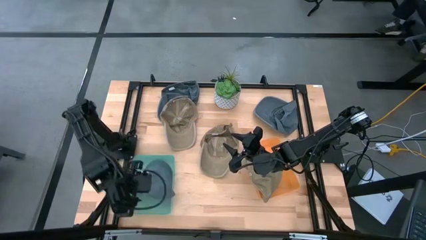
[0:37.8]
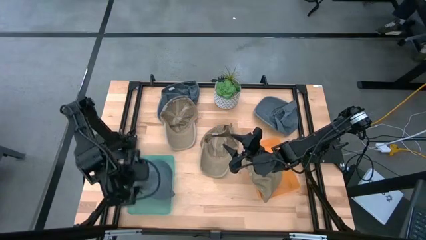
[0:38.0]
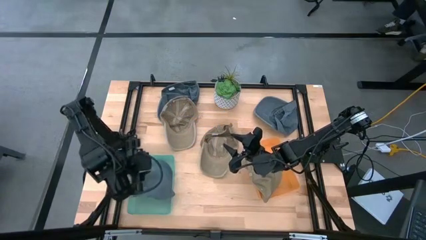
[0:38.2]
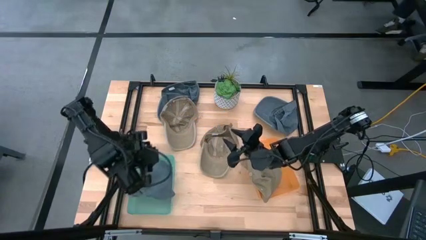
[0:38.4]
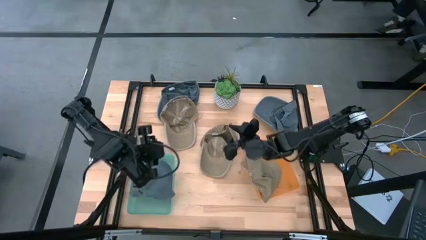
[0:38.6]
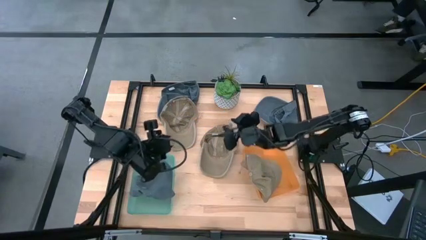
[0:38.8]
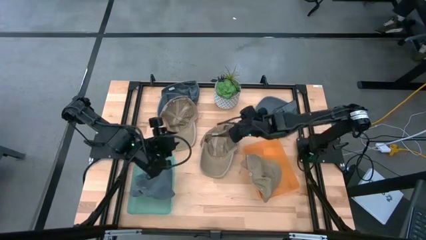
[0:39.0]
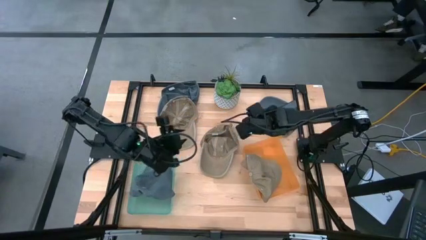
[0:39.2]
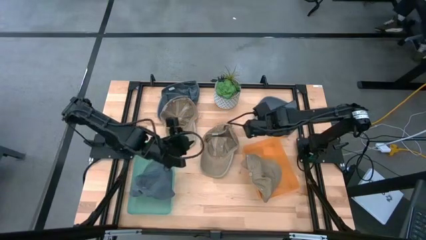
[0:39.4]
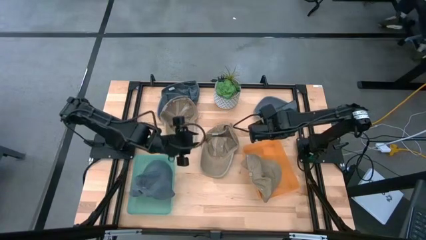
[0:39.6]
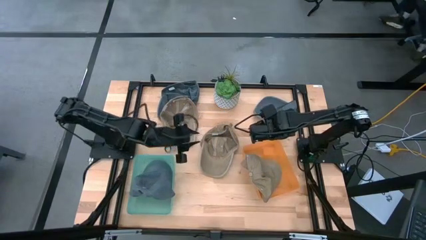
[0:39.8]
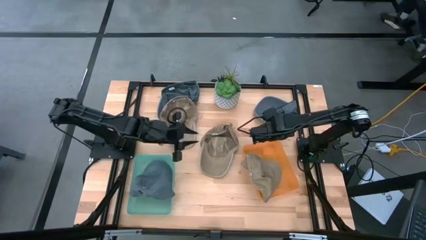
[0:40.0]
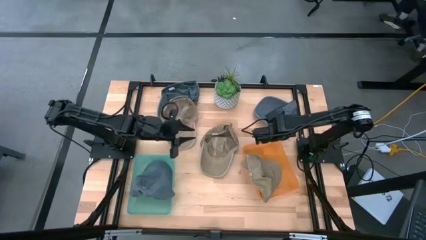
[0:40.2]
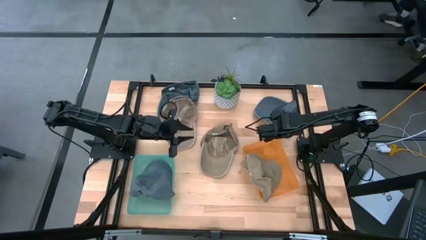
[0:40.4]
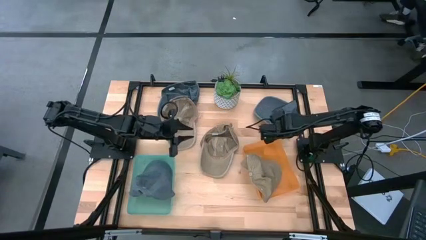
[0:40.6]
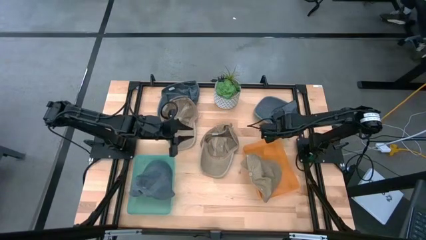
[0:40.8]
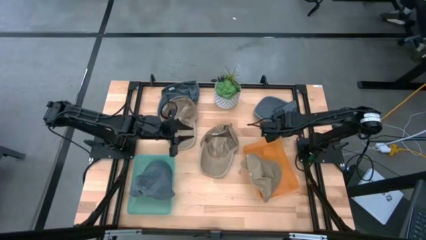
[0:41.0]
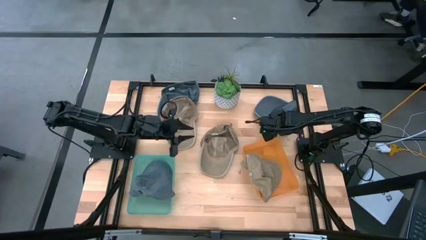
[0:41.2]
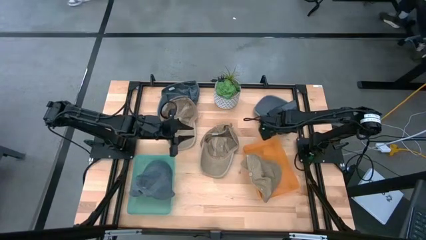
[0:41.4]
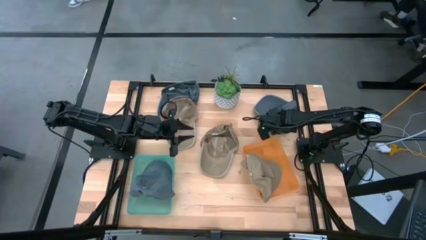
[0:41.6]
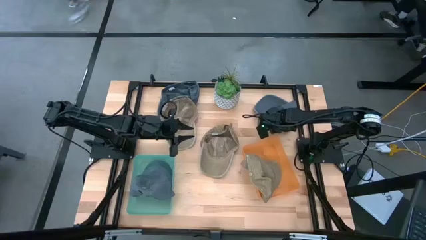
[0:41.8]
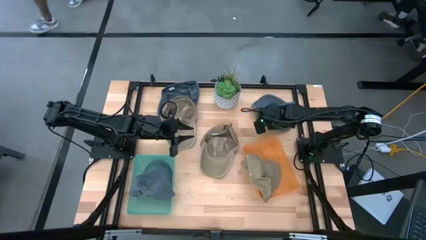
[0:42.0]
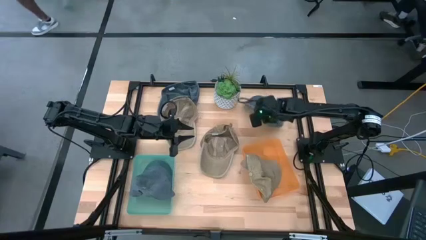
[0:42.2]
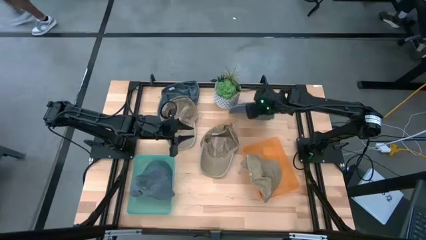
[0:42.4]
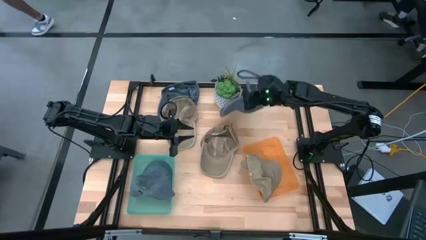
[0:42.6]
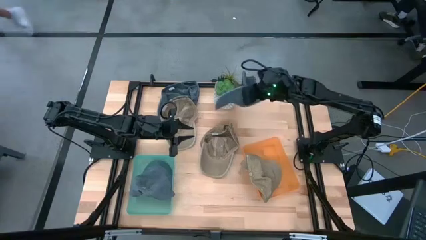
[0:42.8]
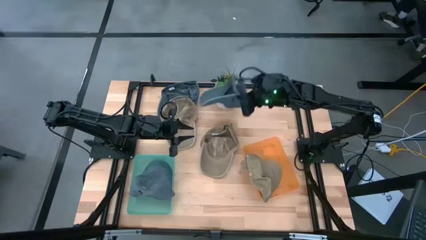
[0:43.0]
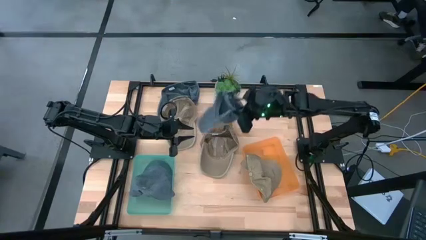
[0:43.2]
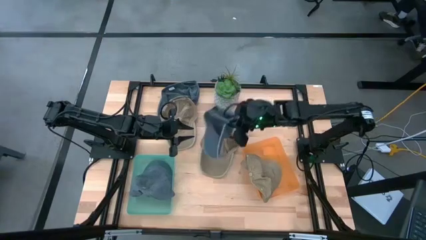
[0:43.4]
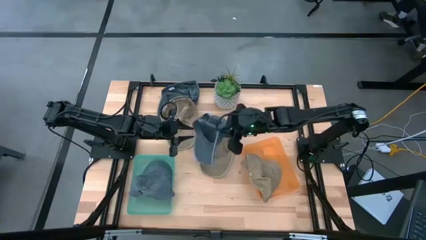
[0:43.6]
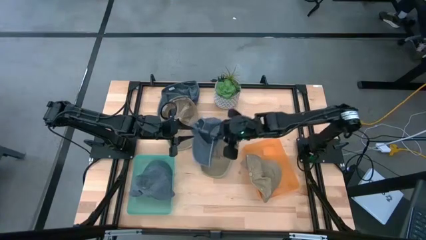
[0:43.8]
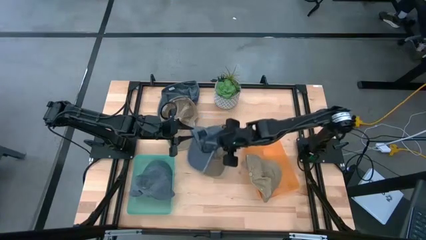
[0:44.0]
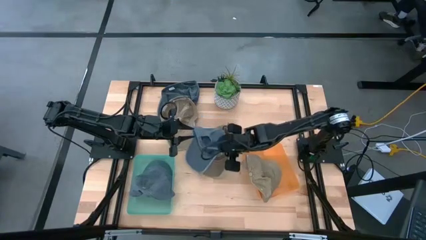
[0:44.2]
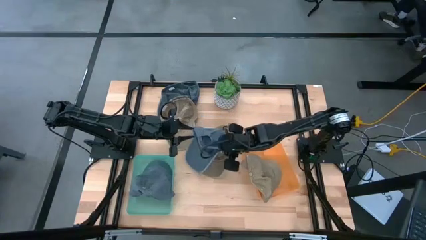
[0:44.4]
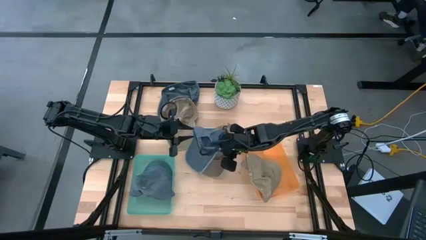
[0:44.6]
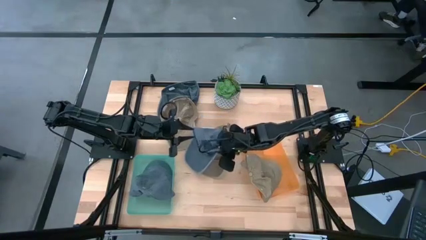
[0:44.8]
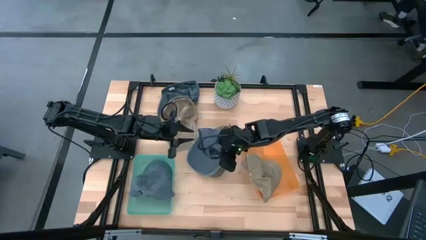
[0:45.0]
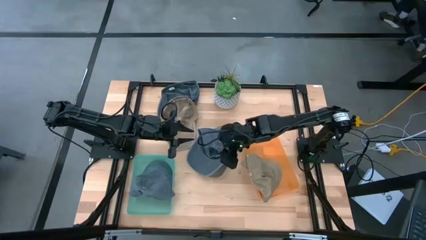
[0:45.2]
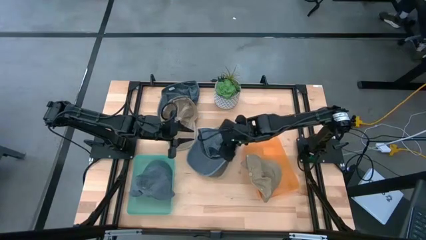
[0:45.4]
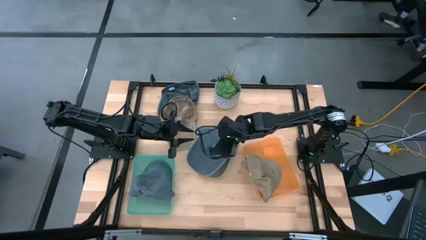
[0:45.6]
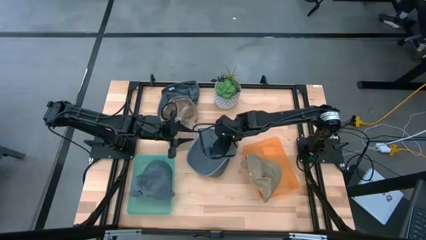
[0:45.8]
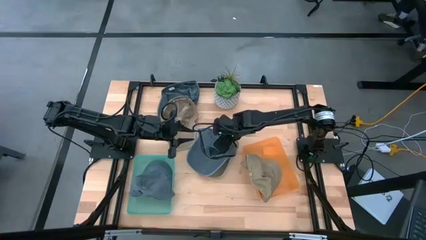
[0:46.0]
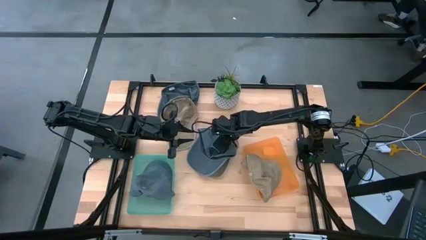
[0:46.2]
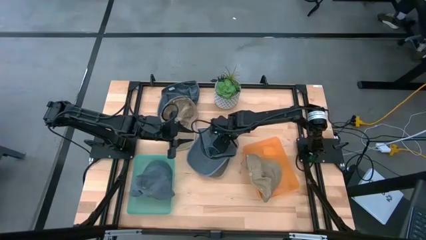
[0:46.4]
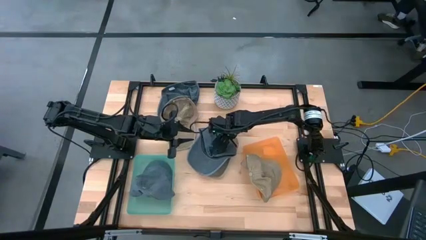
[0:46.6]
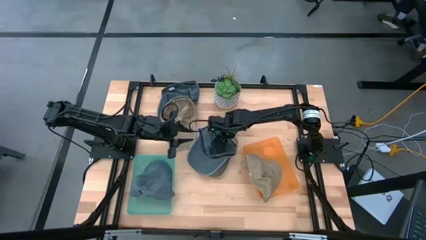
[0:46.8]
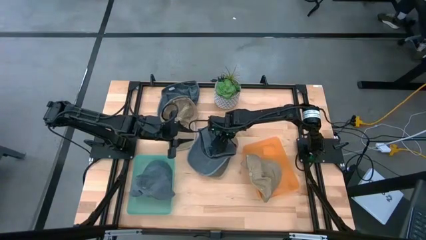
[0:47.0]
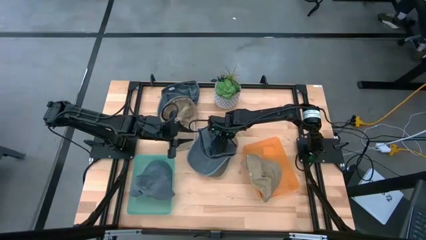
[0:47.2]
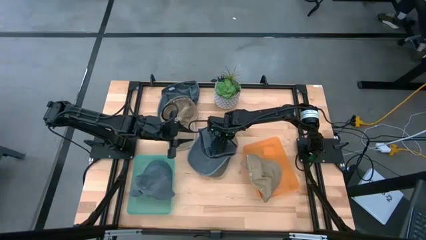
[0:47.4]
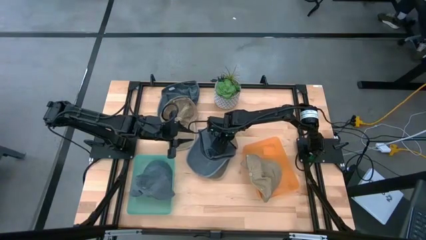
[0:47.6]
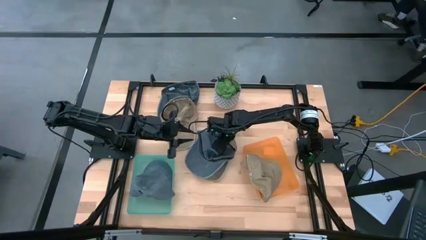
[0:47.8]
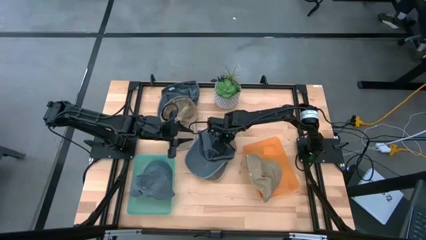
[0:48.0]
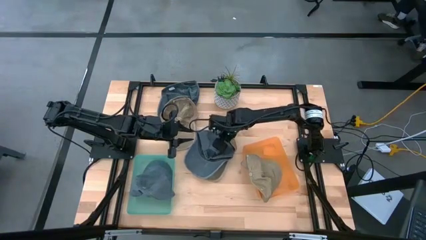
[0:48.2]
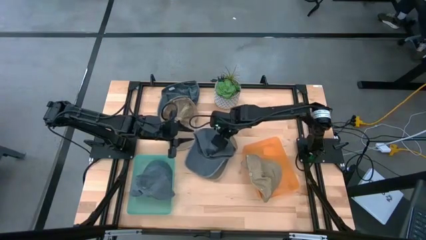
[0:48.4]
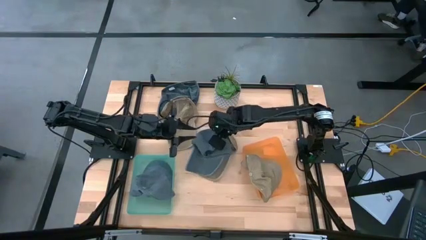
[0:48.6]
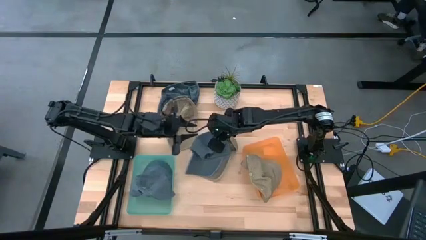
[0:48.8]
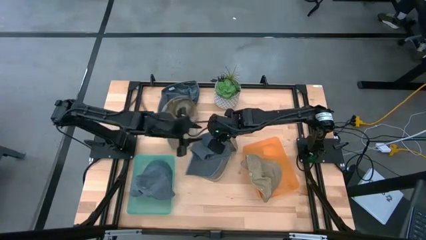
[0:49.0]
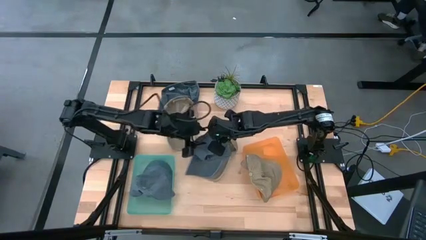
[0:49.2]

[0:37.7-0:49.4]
Task: Pick & Place hat
Put the right blue cap into the green bin

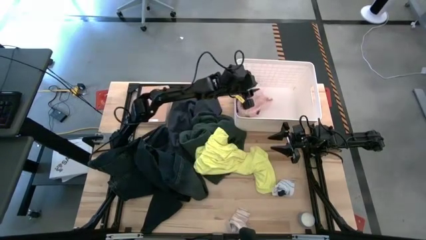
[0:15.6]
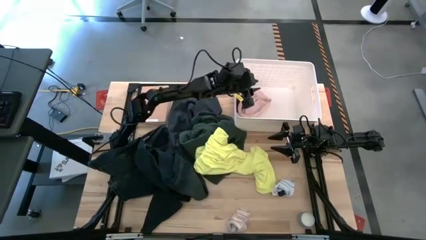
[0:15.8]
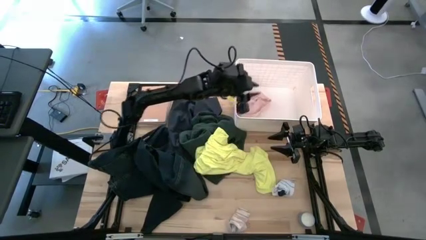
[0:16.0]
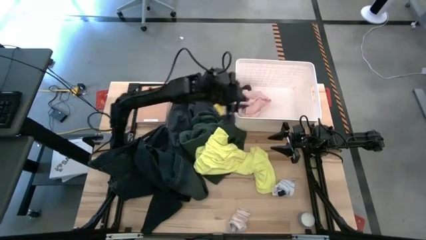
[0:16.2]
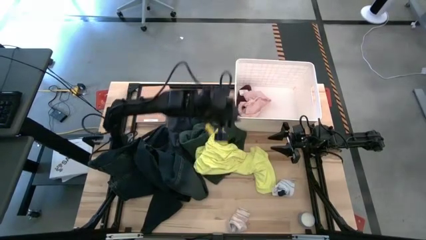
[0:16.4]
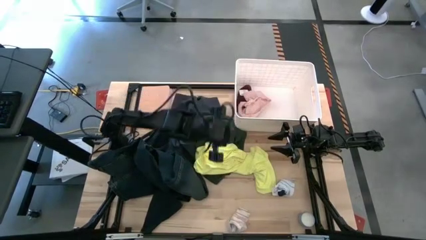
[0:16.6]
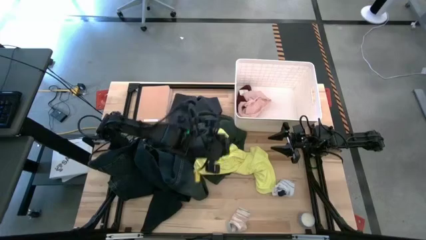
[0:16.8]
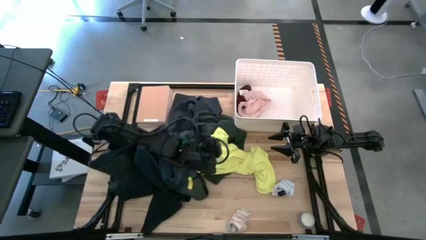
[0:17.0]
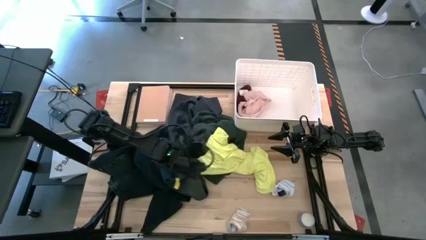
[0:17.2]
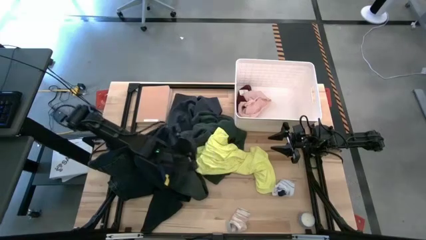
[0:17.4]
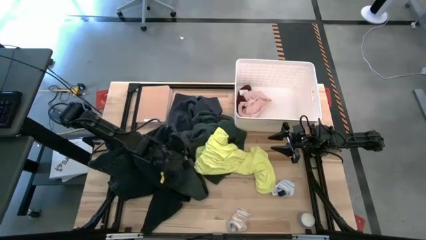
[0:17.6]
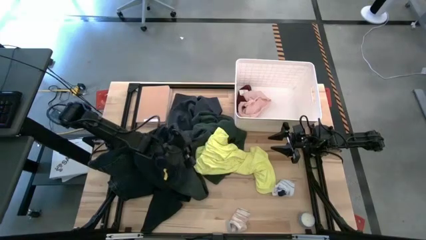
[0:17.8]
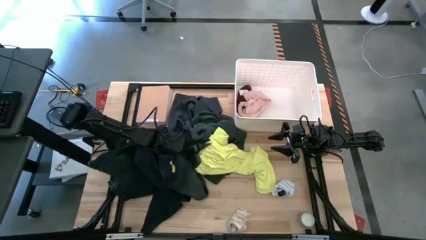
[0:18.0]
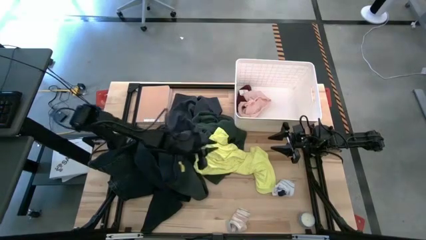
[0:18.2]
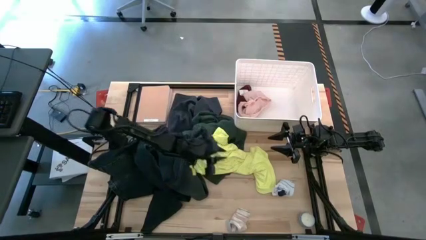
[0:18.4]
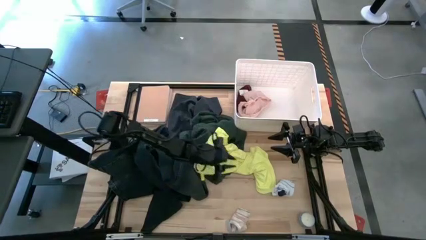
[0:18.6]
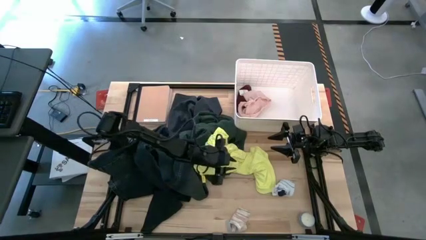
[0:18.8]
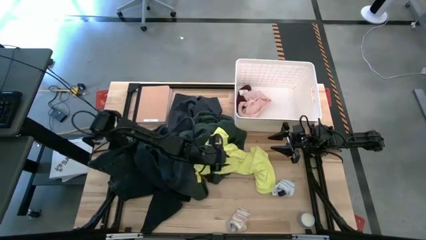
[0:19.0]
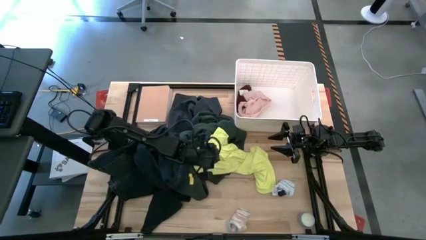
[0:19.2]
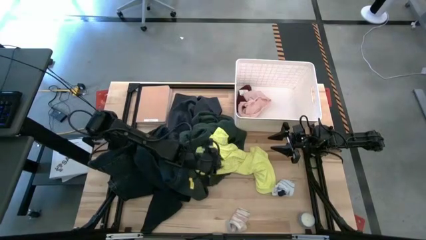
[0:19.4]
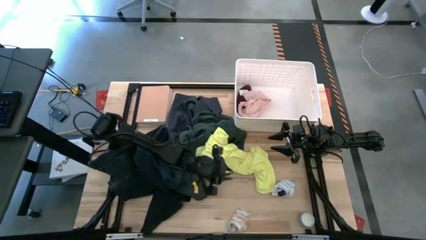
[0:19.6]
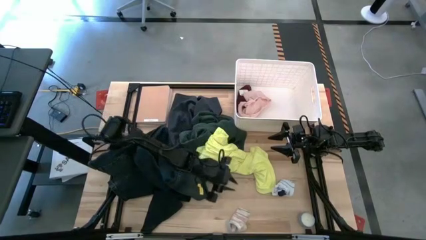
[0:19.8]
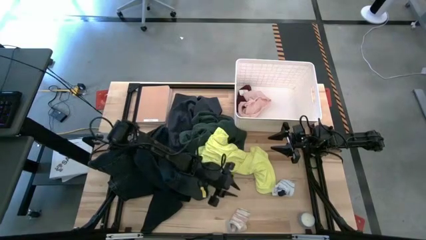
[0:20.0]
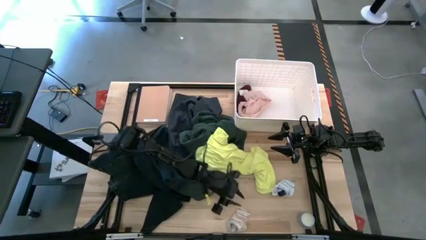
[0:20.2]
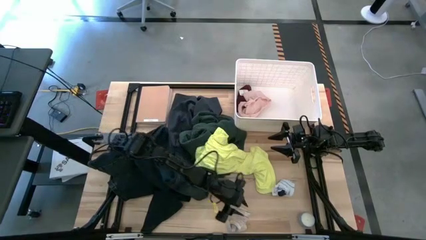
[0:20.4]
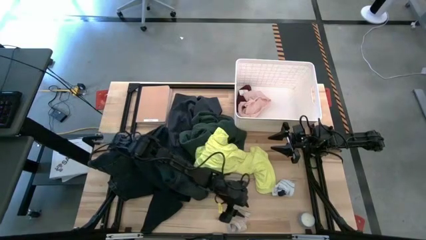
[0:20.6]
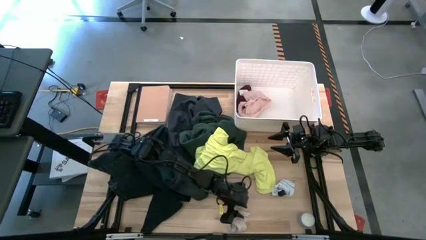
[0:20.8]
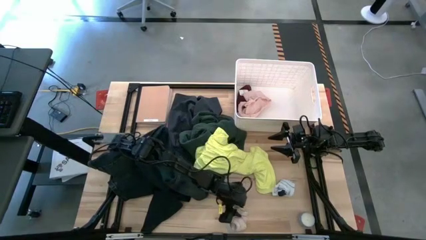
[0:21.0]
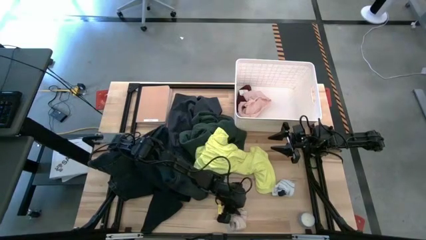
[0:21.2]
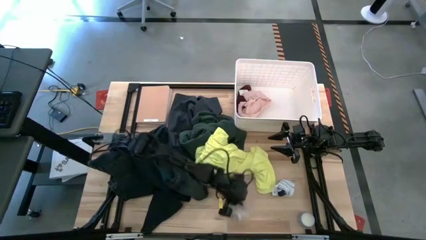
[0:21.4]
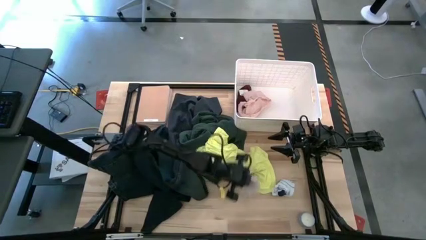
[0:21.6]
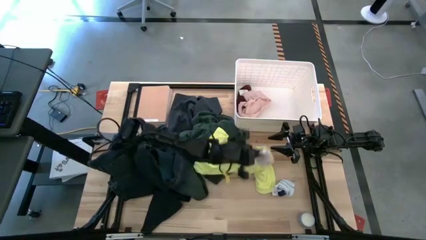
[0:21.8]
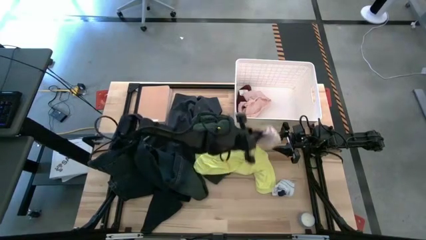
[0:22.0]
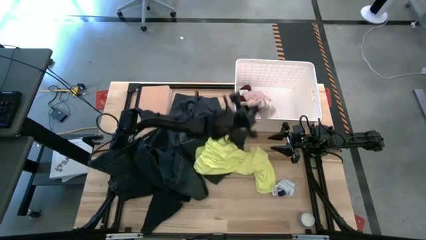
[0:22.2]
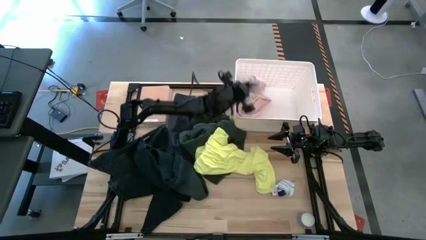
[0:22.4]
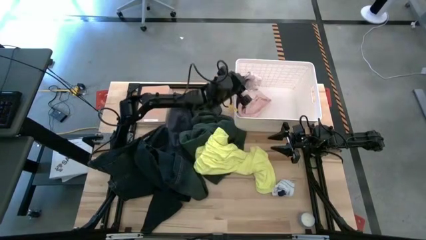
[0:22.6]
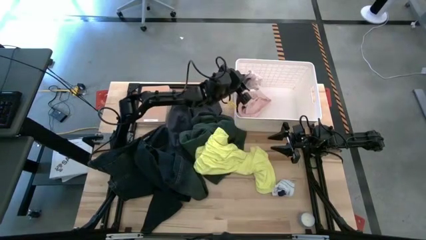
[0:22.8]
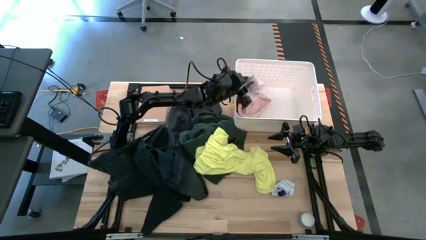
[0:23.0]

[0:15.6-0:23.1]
Task: Sort clothes
Put the white and orange socks into the white laundry bin
